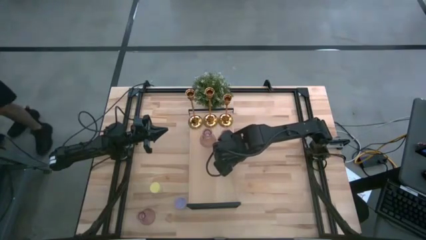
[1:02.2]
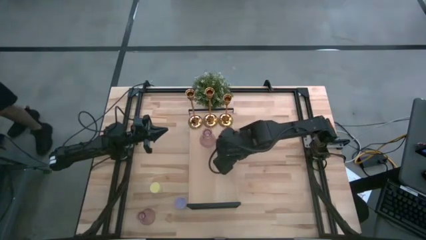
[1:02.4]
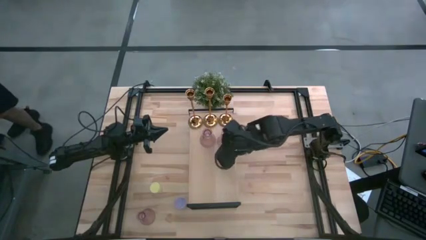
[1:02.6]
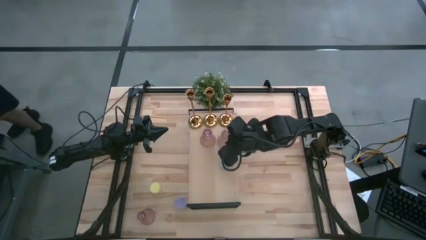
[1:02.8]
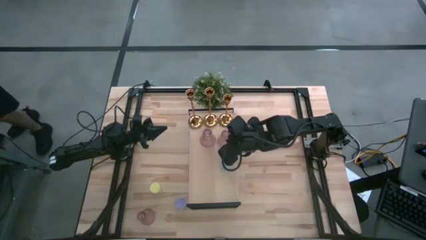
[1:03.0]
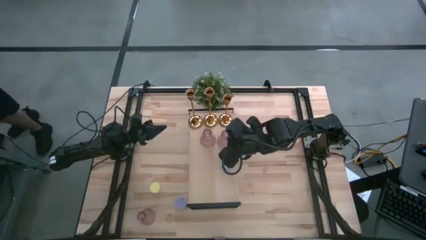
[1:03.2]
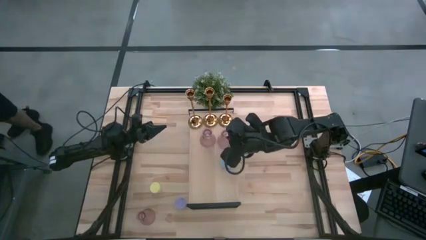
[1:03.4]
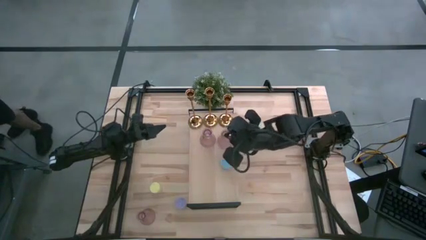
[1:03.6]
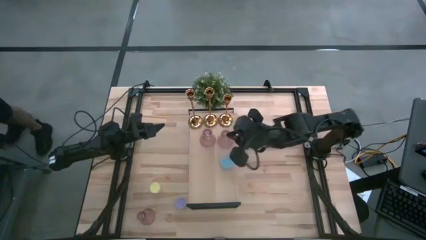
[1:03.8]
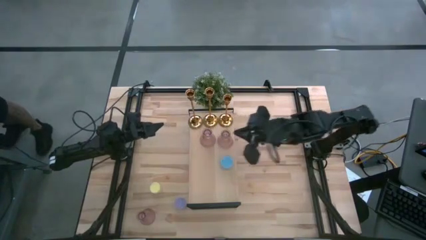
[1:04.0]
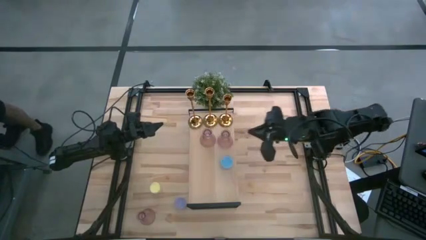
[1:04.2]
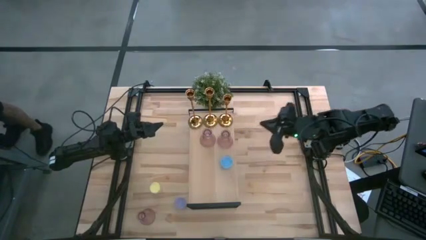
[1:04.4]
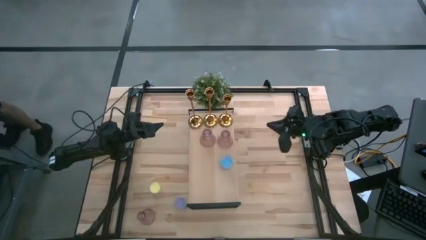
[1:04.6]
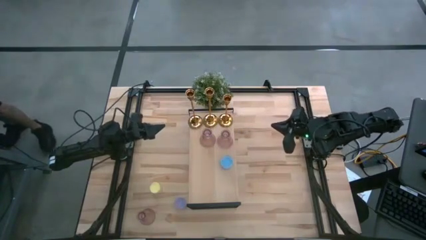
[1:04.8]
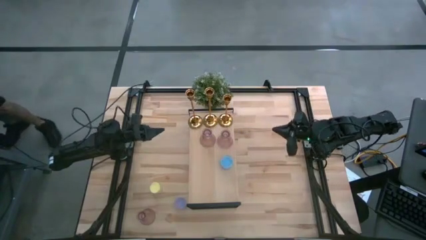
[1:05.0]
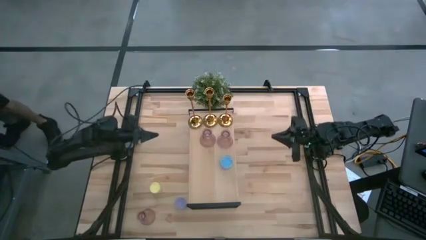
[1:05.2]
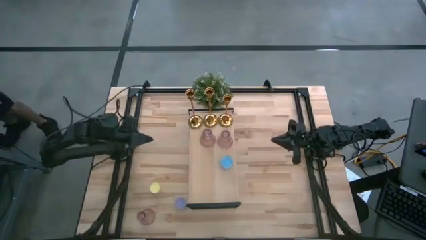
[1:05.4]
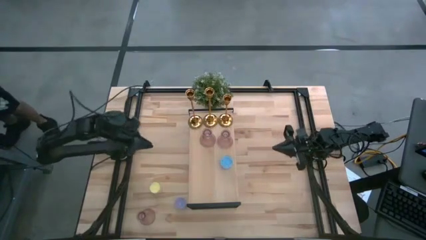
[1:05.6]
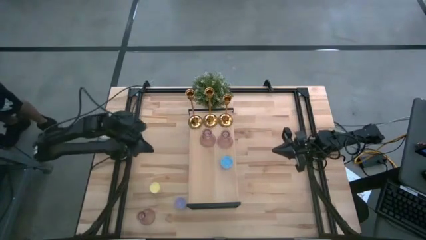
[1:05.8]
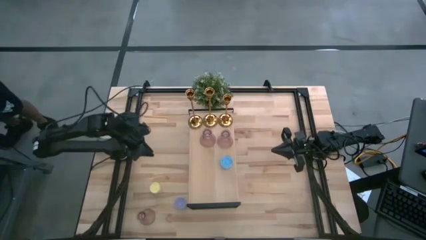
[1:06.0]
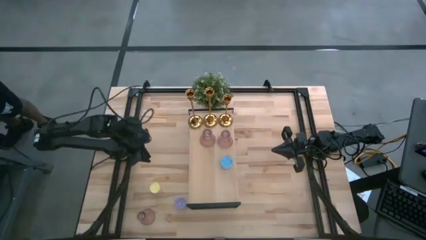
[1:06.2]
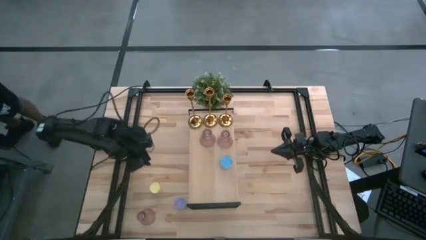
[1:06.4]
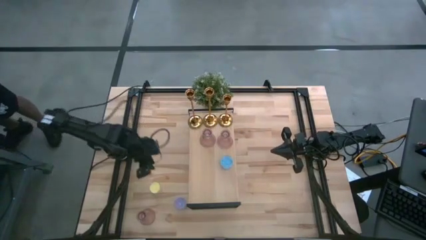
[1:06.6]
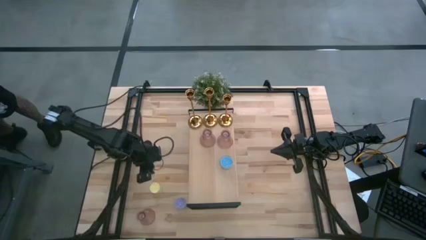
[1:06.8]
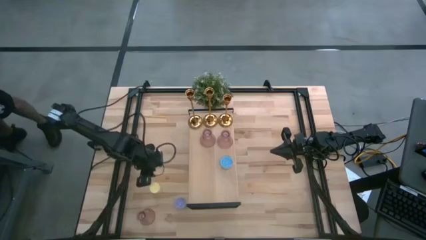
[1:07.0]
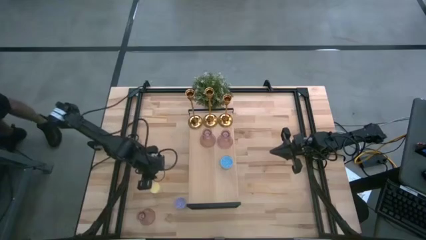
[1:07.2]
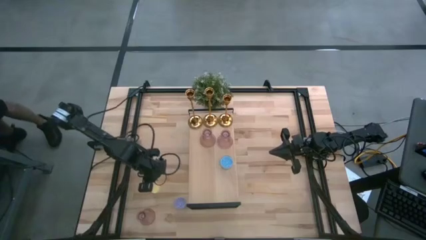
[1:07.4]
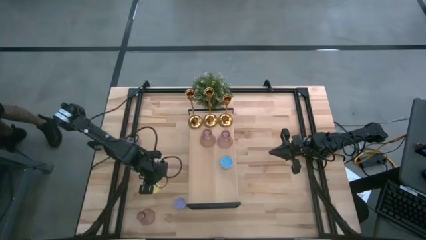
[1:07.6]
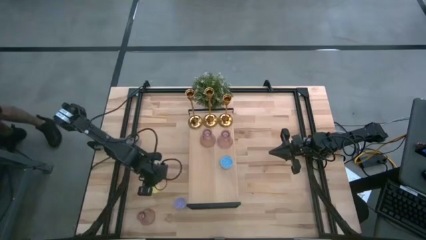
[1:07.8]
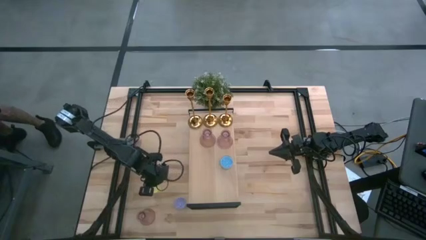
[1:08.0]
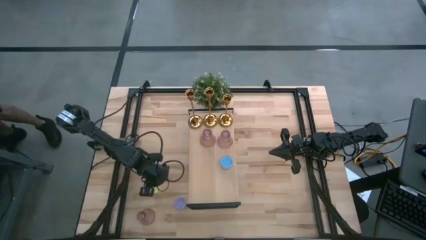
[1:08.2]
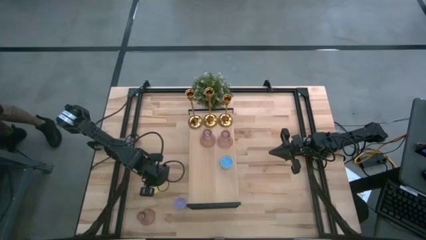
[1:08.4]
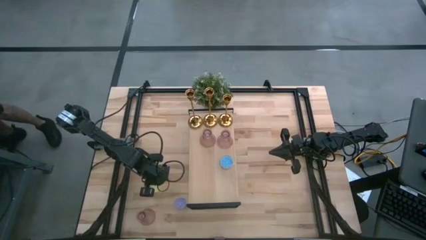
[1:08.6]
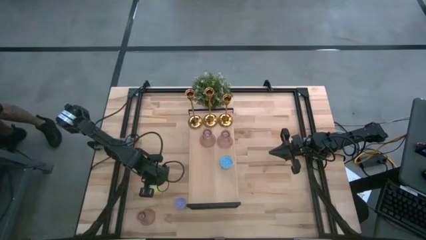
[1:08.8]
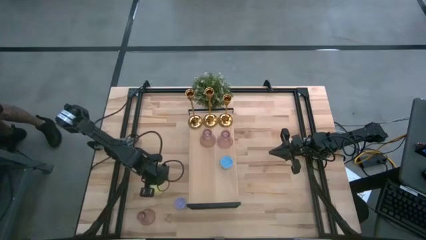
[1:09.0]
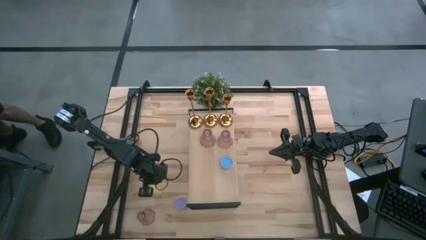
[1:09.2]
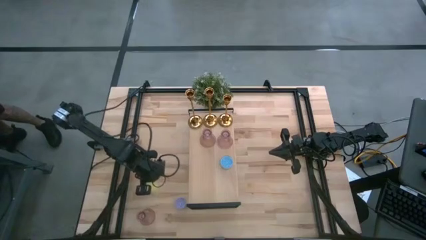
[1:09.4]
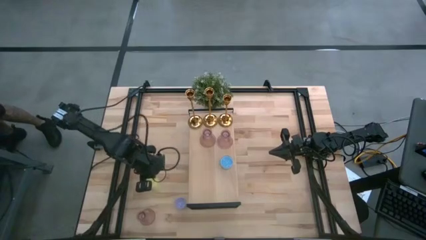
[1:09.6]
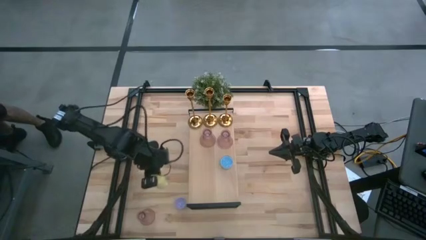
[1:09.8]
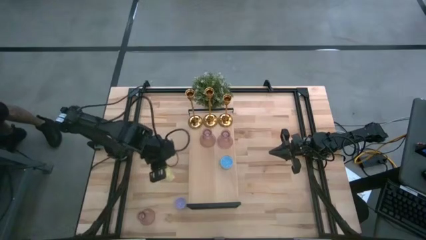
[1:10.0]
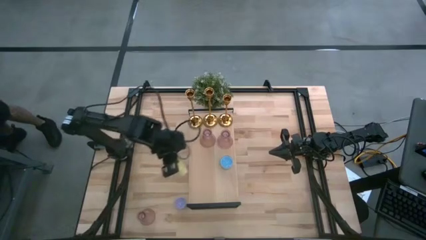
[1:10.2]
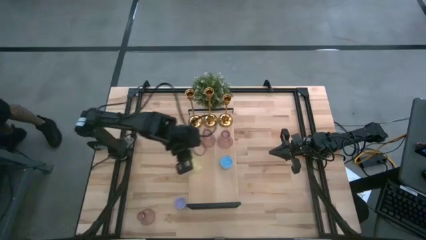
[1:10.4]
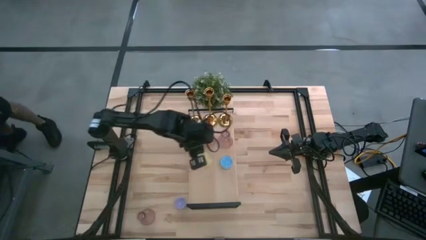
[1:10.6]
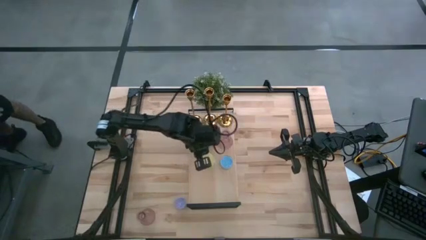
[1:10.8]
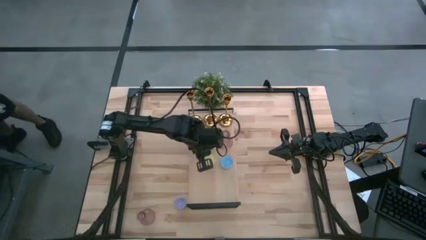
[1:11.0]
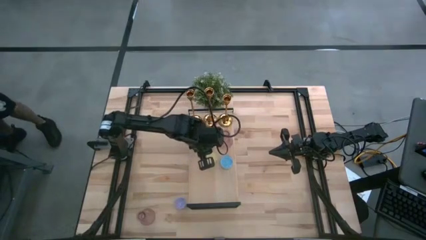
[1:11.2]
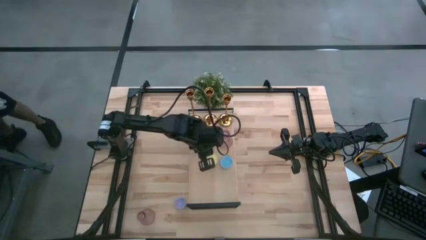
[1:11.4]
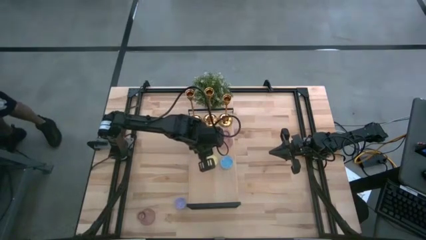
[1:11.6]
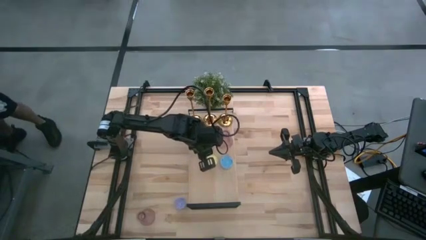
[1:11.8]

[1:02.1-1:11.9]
Task: Pick & Place candle stick holders
Put the yellow scented candle on the shelf aligned with the blue scented candle

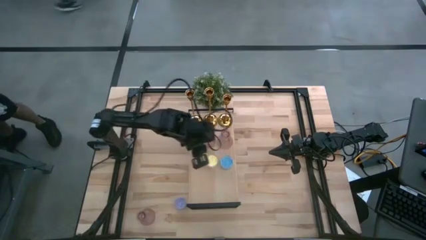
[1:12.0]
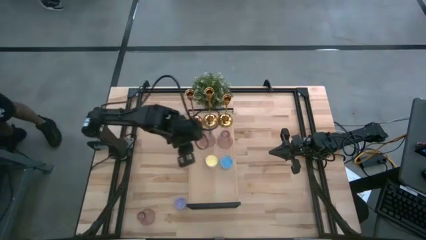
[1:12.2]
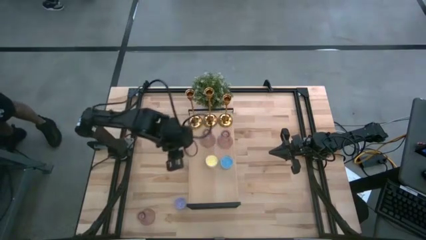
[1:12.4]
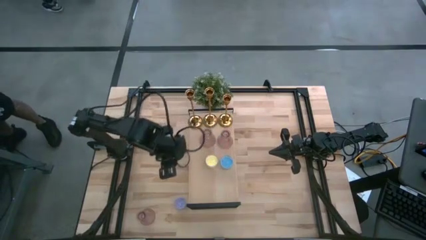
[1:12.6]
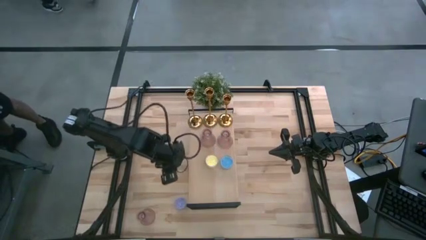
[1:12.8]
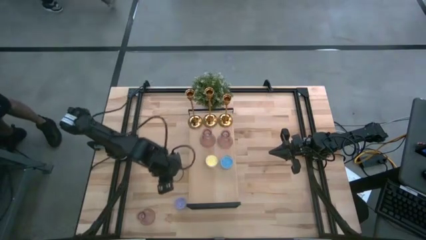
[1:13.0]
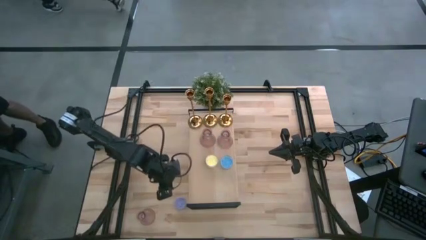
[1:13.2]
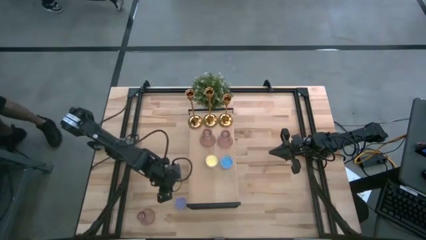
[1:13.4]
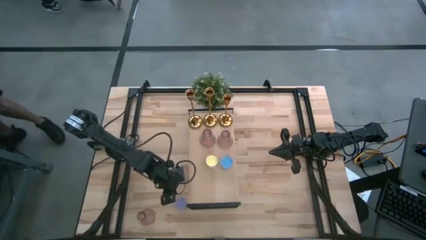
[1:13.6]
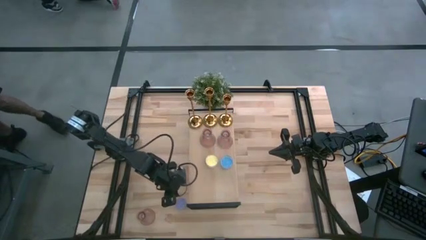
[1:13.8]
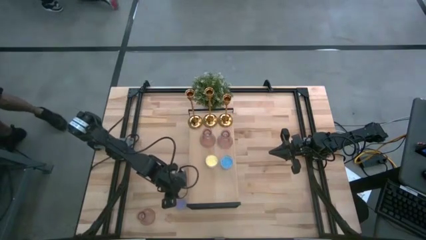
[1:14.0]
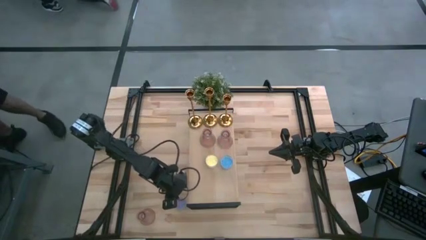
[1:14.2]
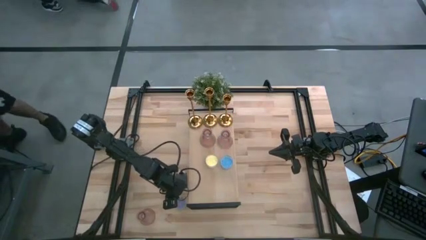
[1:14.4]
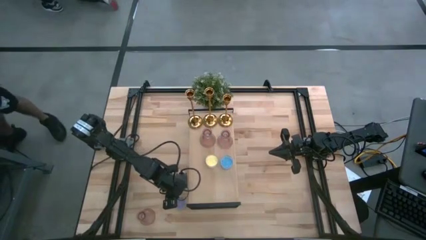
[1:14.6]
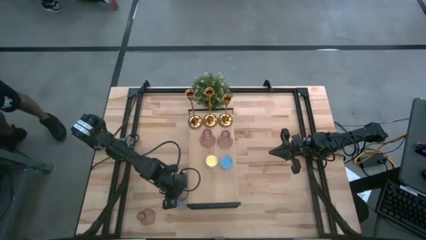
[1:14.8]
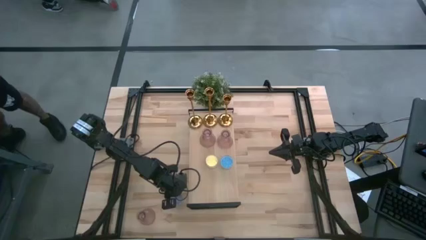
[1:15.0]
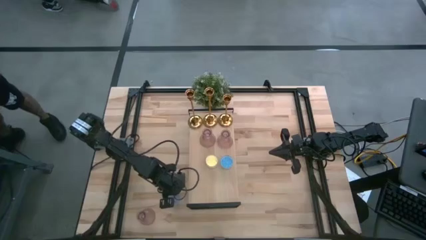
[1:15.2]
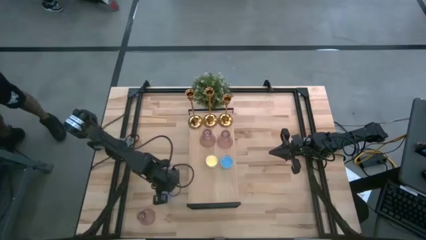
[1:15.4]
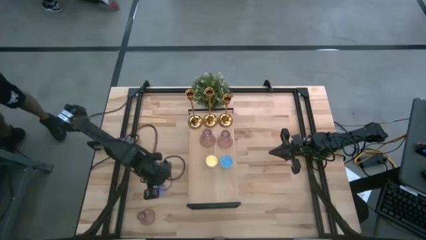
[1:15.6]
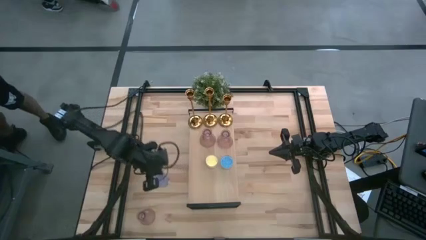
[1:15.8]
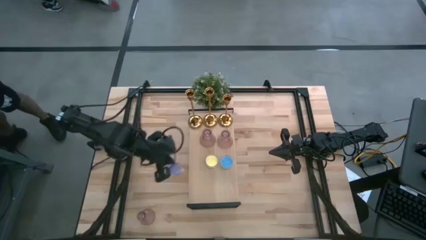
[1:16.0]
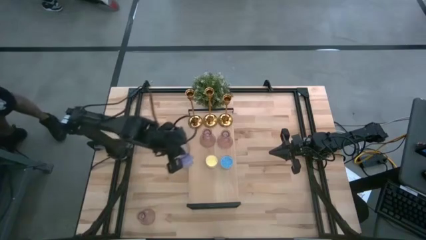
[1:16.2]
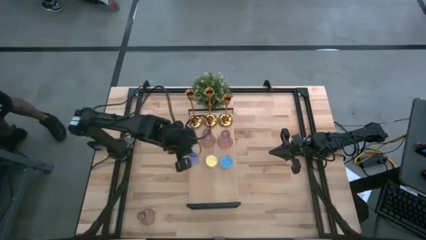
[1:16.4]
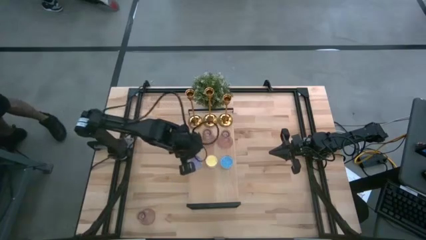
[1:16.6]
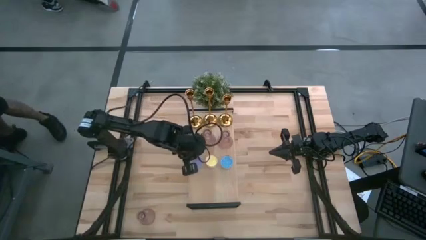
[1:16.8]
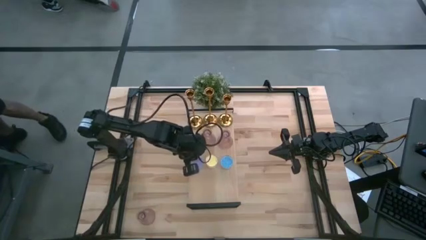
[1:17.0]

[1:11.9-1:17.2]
Put the purple scented candle on the shelf aligned with the yellow scented candle

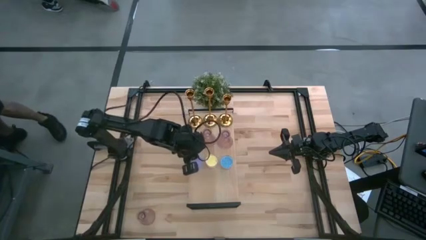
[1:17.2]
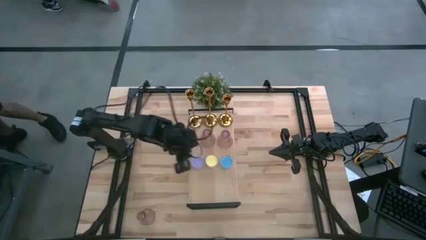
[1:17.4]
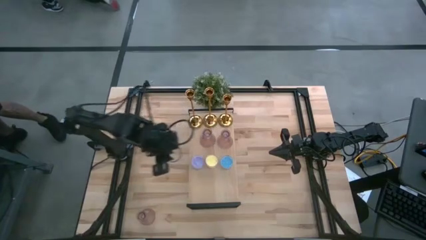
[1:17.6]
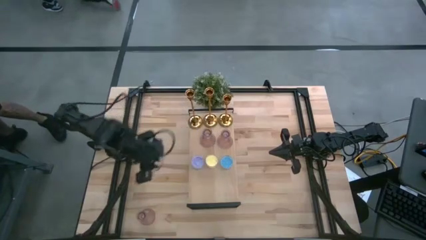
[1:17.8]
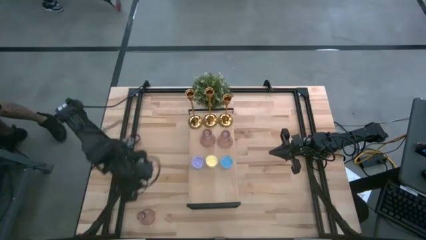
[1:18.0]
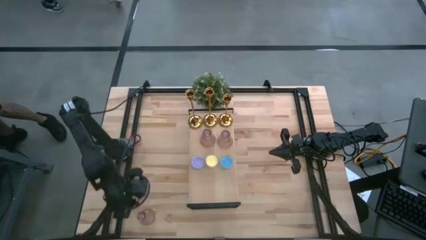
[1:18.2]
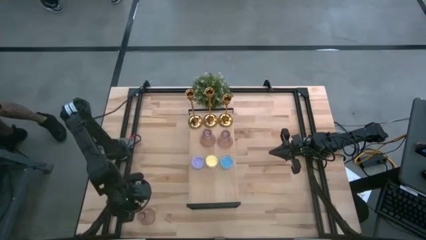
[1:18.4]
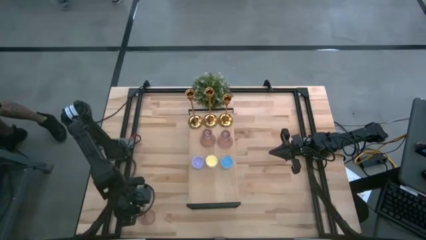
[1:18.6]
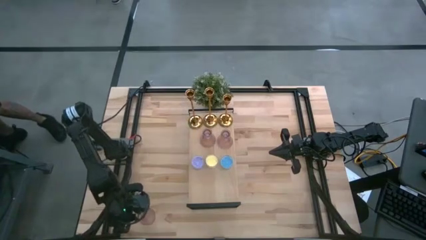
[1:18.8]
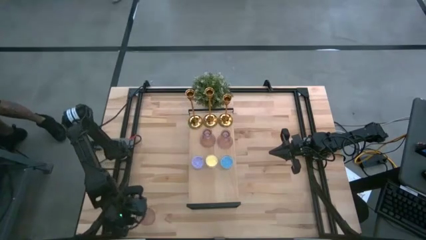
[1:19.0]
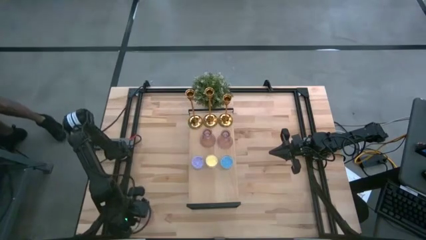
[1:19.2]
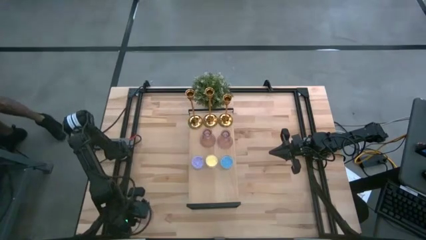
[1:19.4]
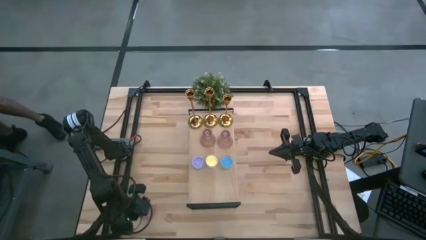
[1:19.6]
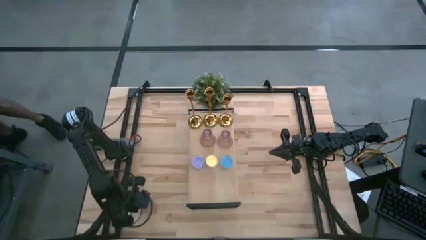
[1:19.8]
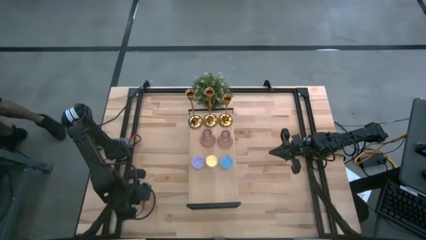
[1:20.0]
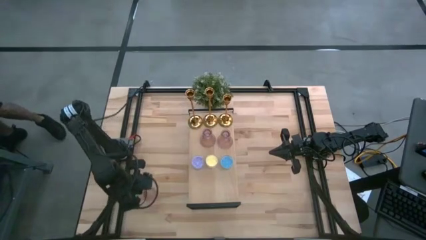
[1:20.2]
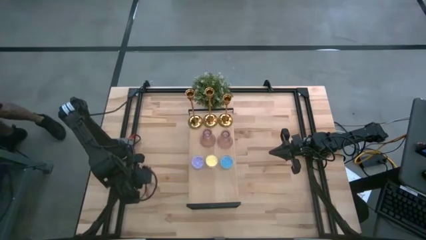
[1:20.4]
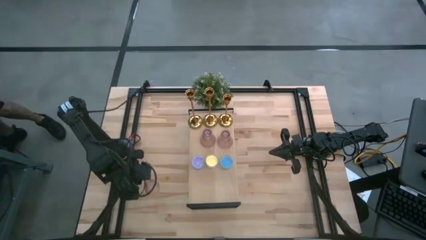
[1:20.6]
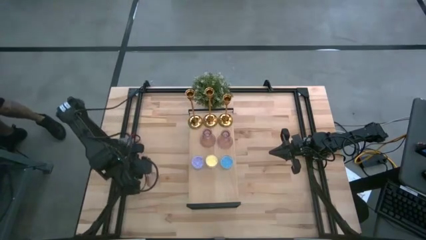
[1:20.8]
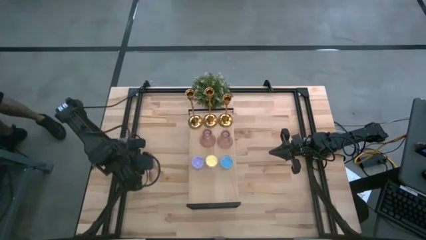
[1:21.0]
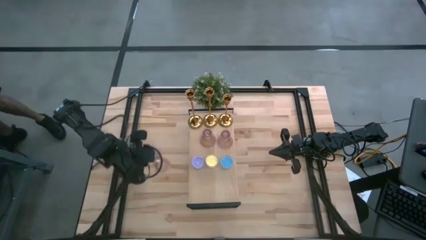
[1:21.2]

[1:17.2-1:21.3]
Put the pink glass candle holder on the shelf aligned with the pink glass candle holders
